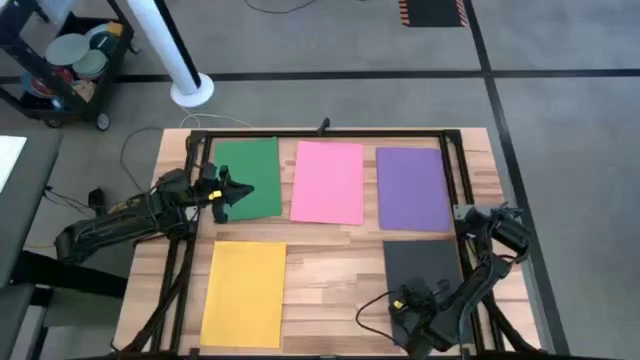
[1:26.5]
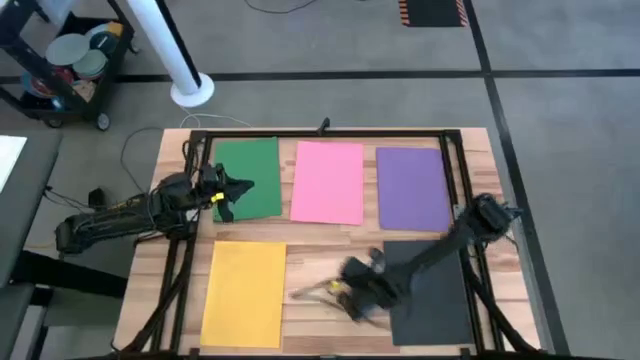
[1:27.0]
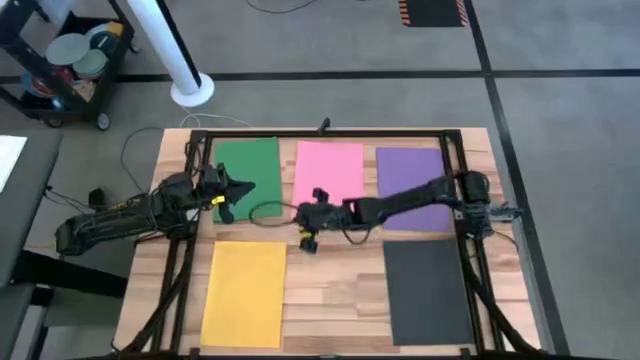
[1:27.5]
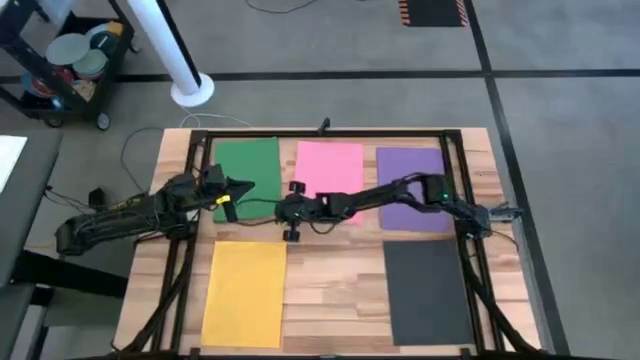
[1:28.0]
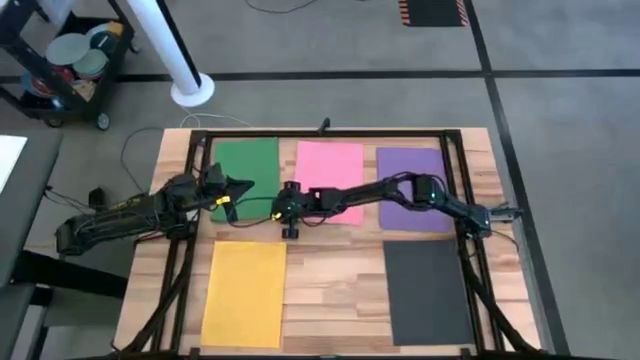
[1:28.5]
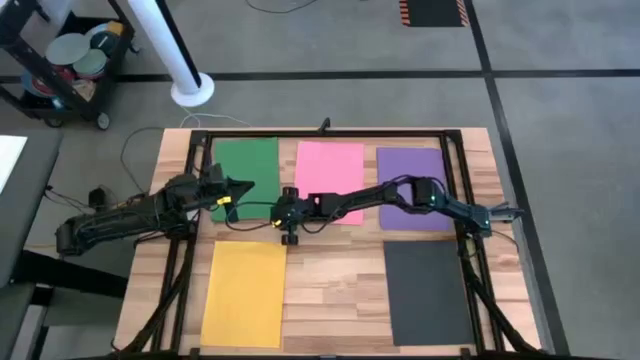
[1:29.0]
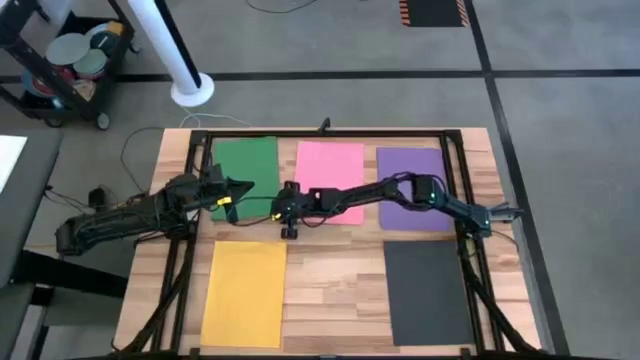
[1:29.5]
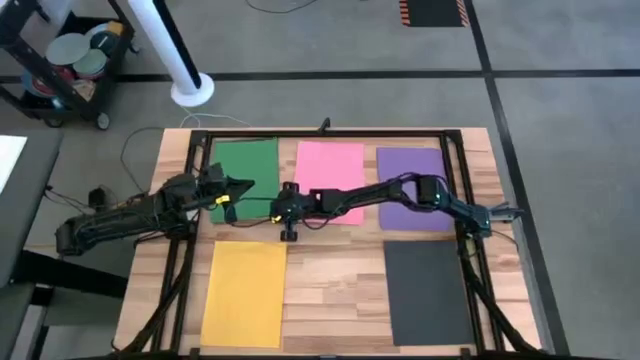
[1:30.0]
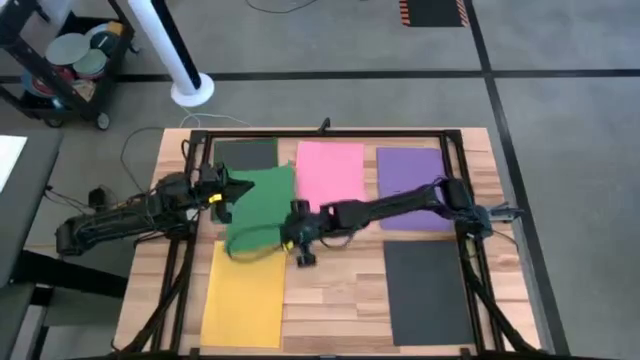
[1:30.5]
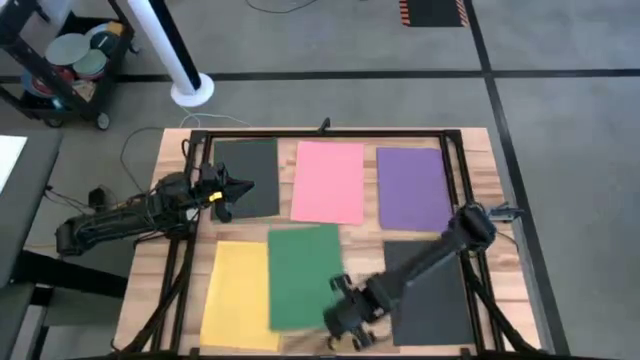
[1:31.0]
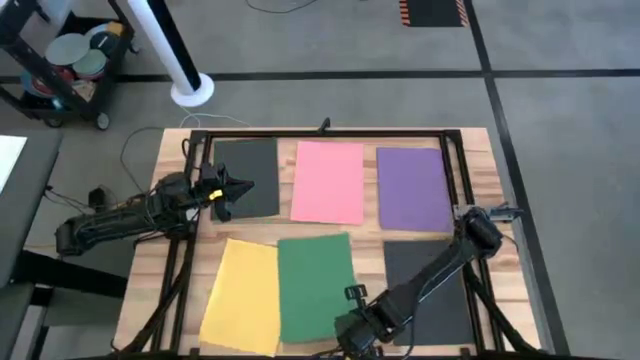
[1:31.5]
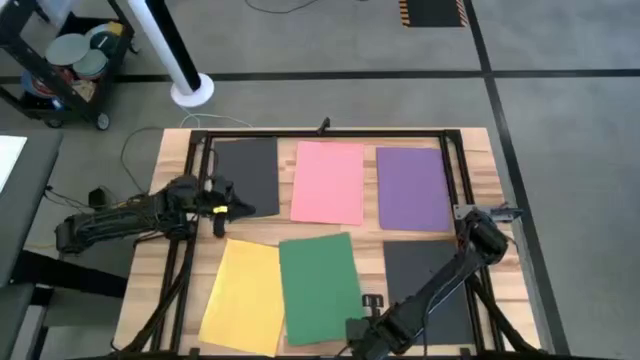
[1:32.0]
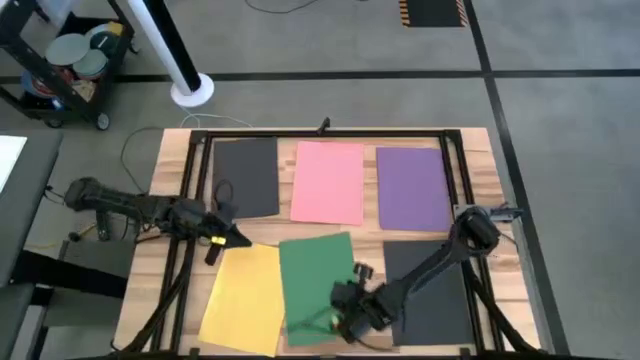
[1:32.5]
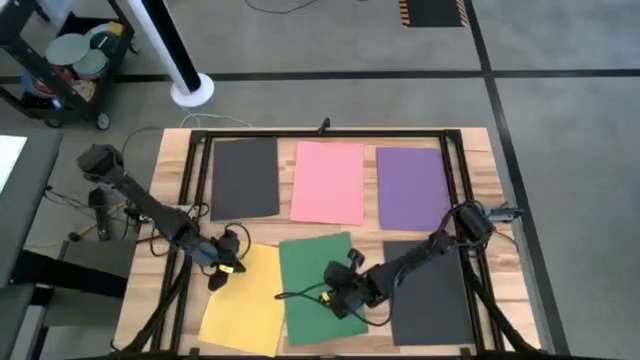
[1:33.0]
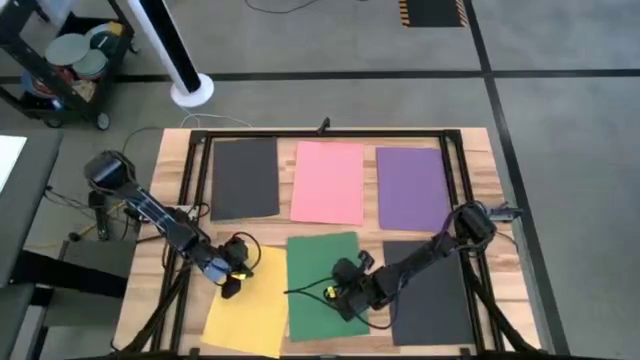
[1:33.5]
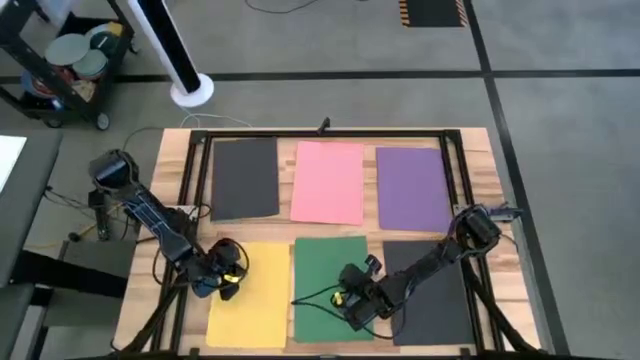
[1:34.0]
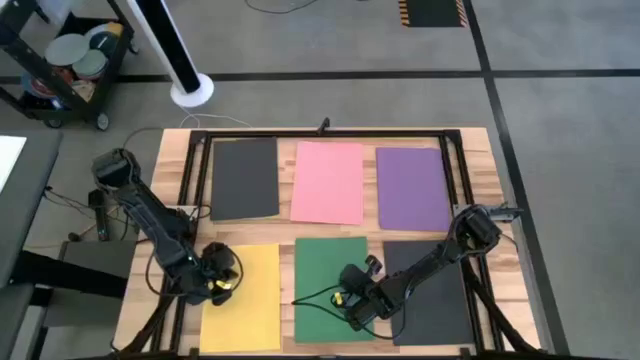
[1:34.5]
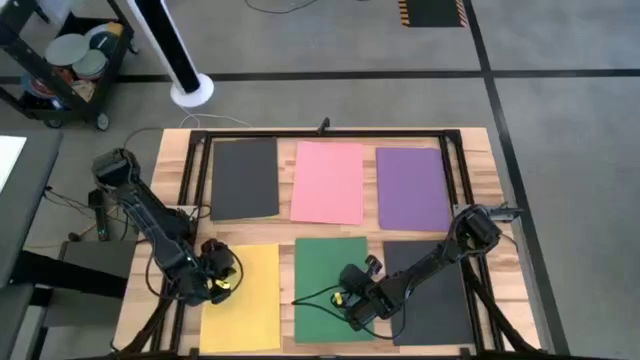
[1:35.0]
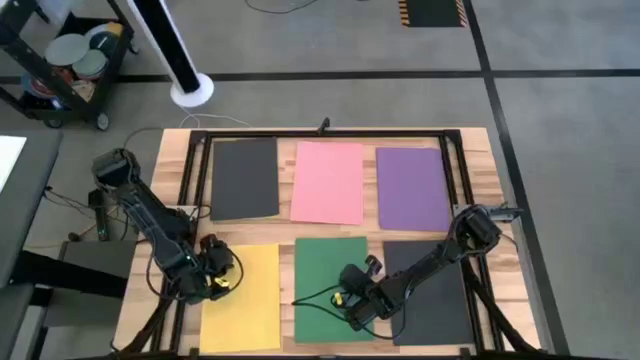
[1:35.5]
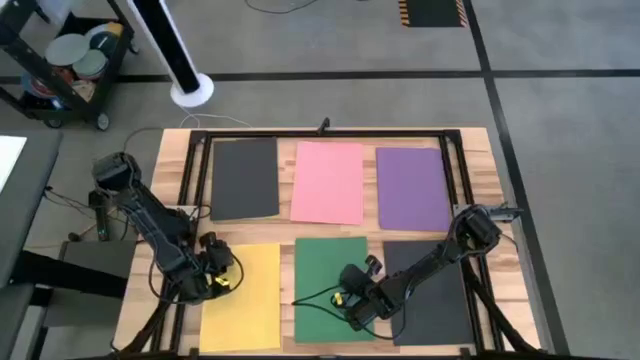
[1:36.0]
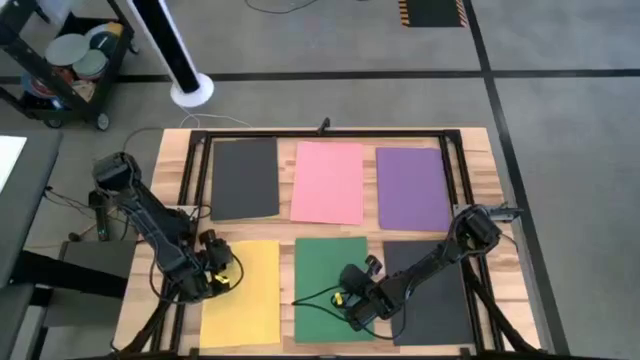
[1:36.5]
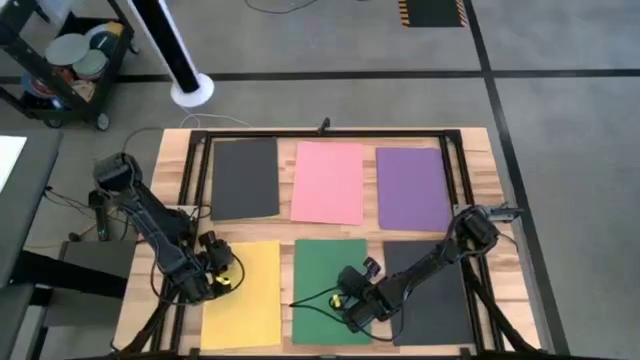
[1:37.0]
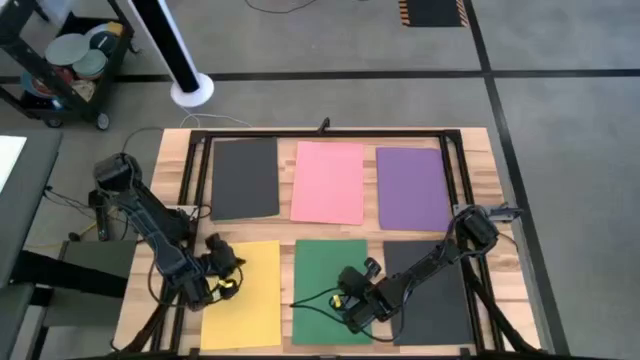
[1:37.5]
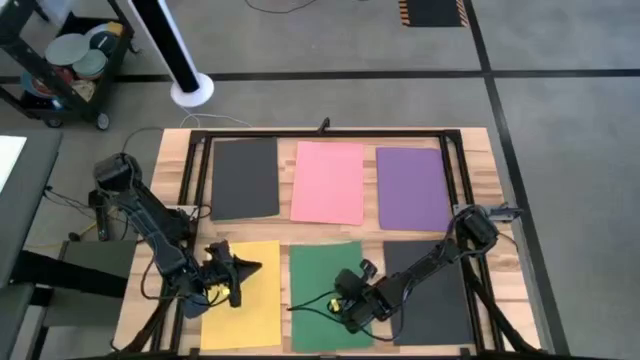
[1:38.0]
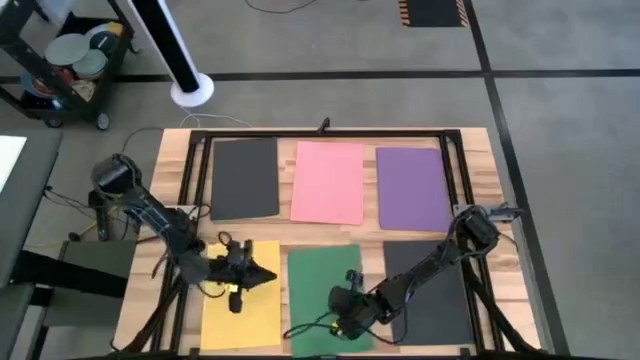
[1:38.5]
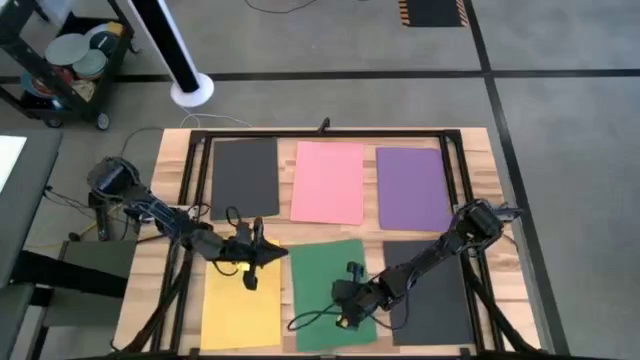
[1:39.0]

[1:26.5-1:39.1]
Task: Organize paper
Put the green paper to the bottom center of the table

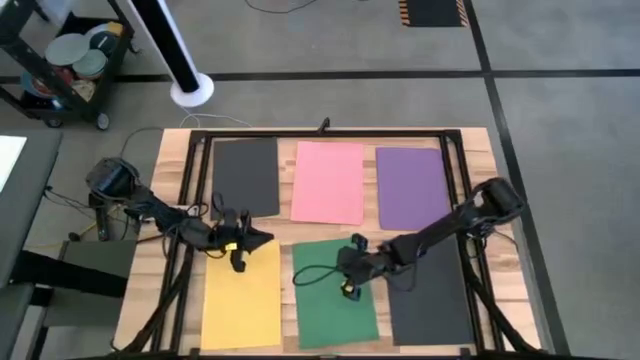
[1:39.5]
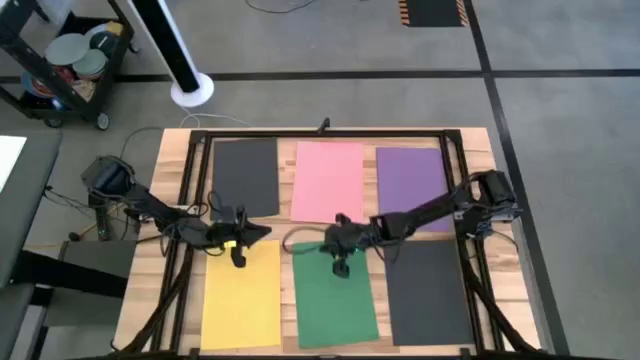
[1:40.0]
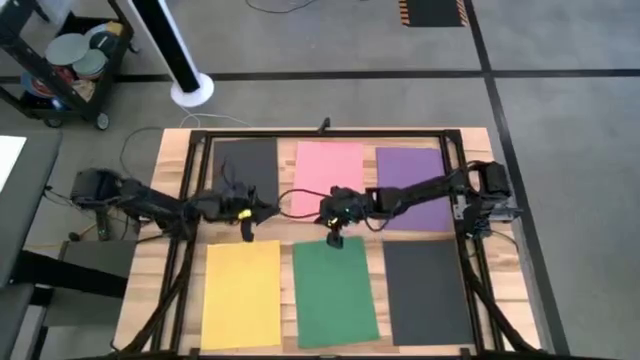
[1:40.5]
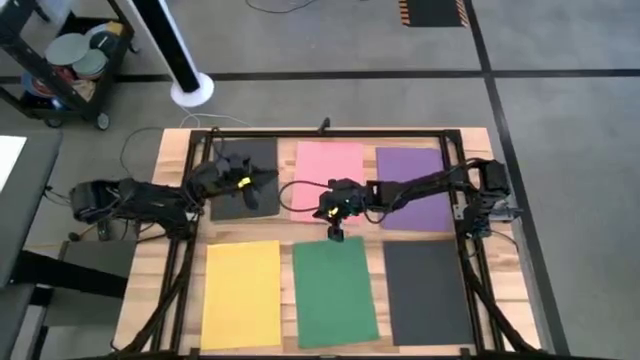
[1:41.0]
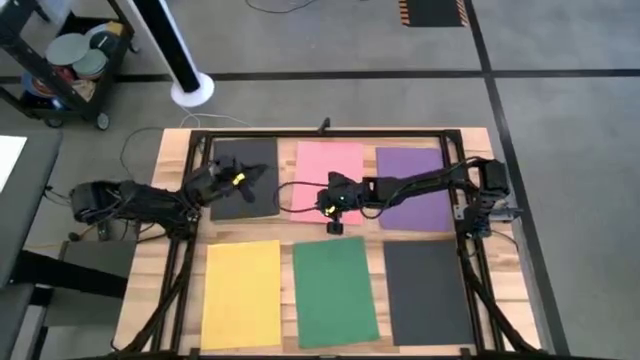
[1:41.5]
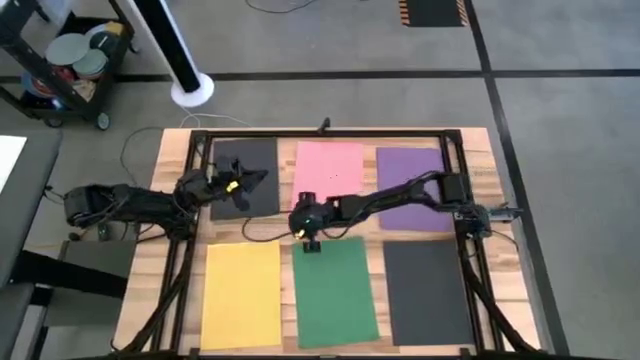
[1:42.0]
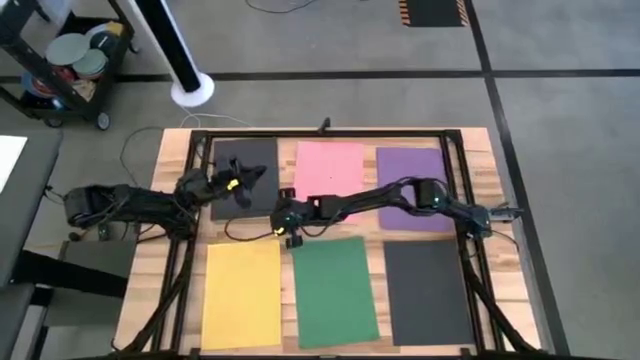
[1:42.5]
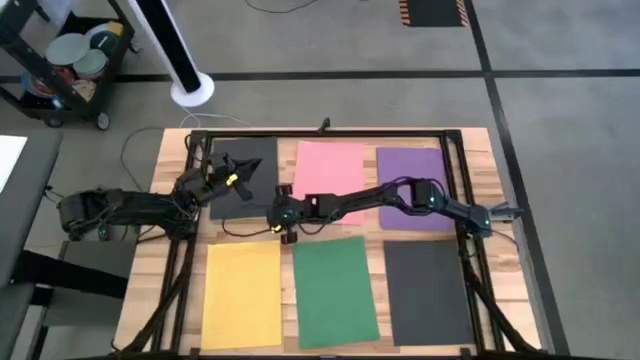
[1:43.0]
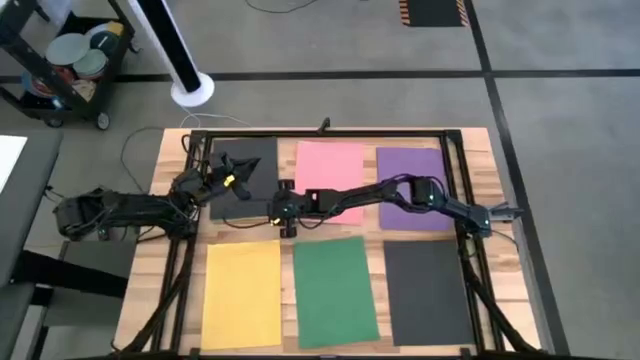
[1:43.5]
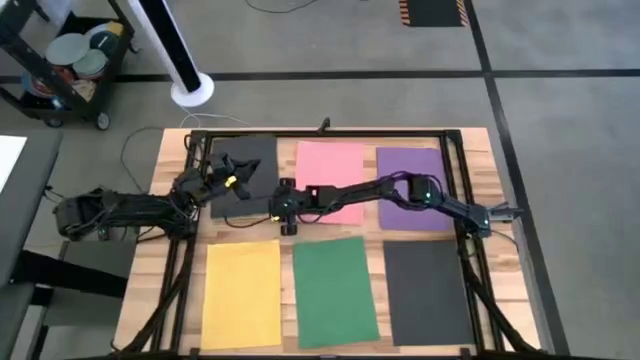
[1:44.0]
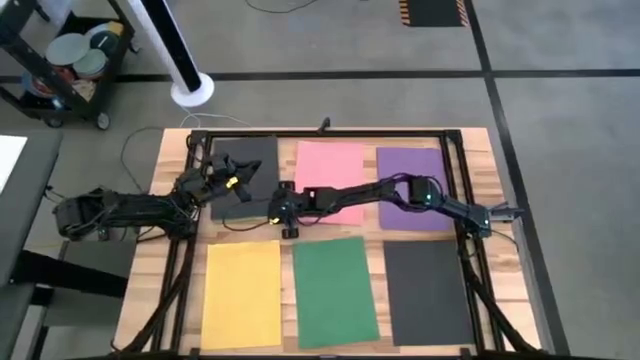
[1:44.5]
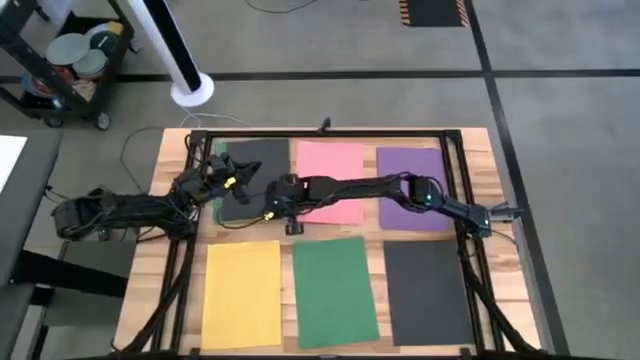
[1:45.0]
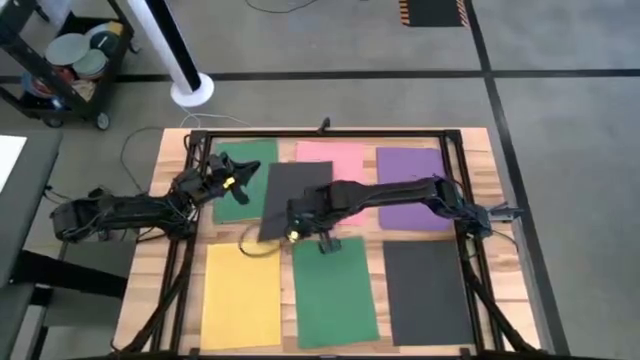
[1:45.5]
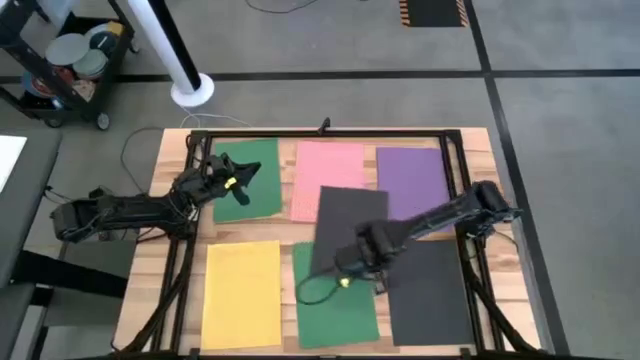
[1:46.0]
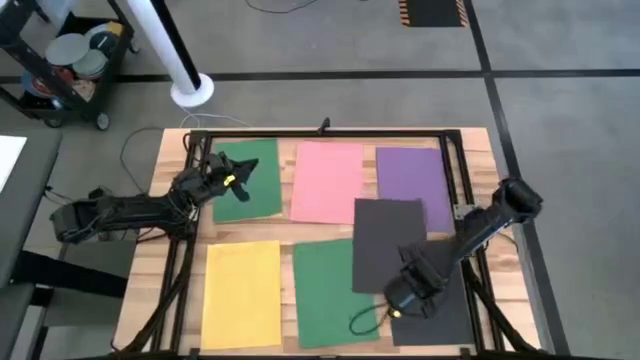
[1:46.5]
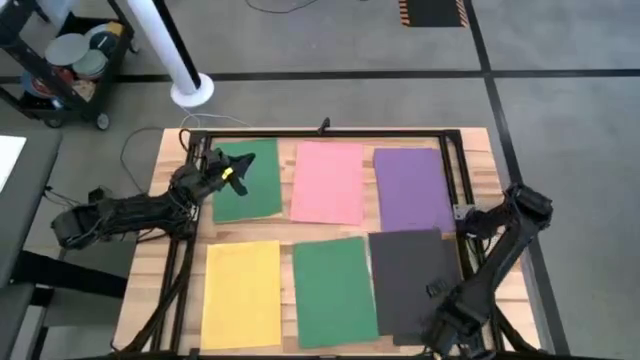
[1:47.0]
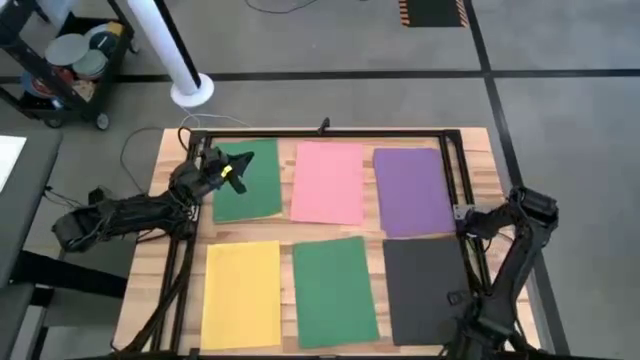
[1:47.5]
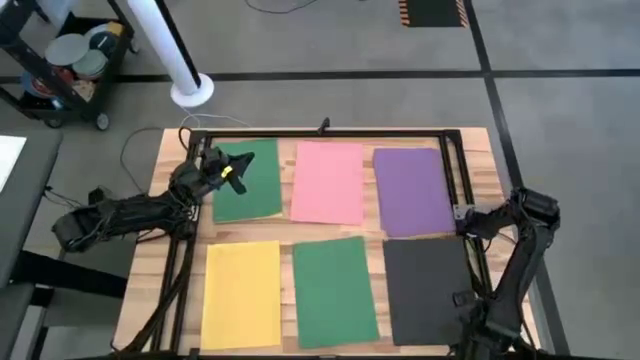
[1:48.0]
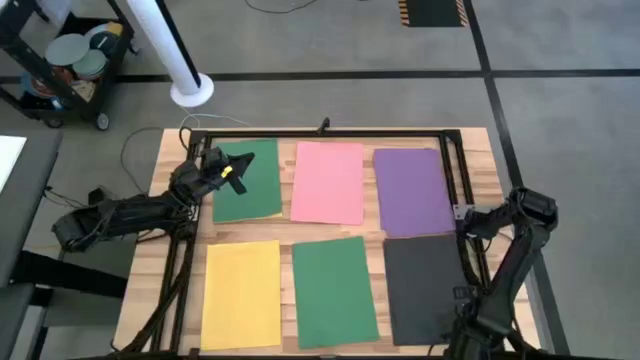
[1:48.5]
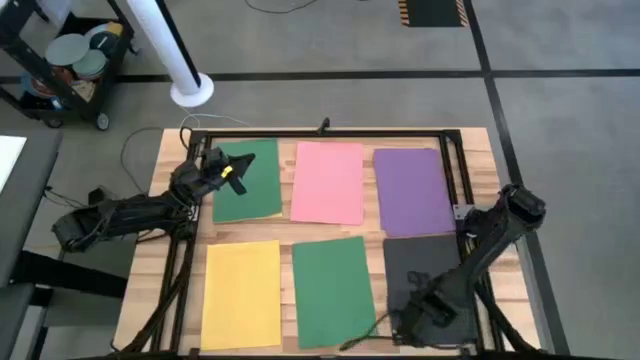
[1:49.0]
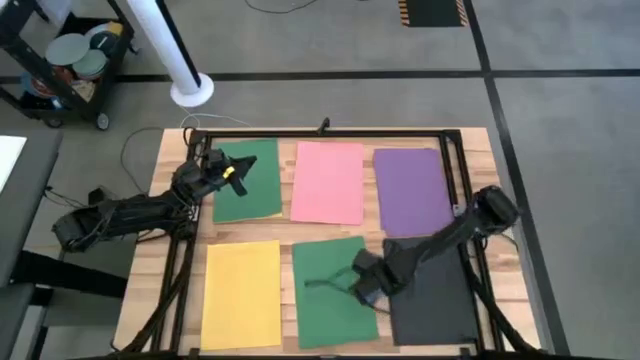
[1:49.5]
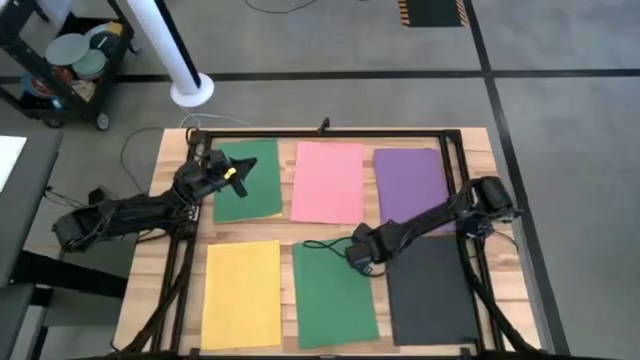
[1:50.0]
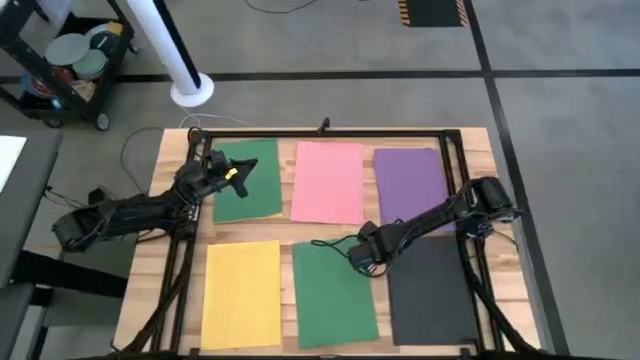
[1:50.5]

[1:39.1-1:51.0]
Stack the top black paper on top of the black paper
